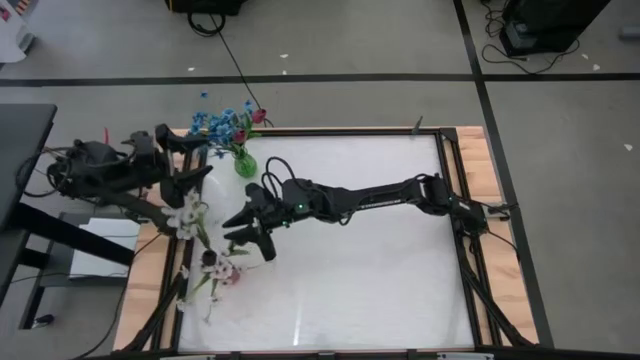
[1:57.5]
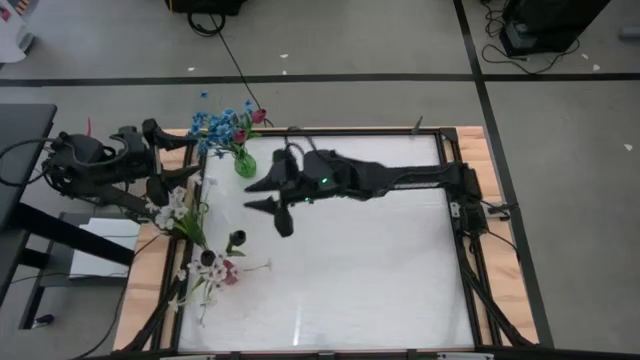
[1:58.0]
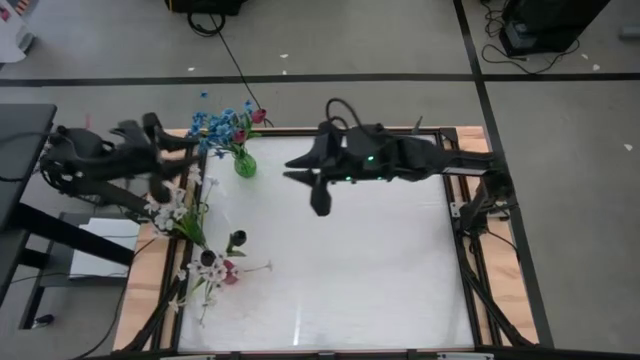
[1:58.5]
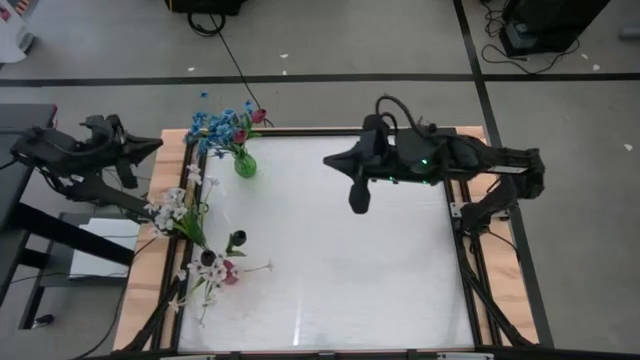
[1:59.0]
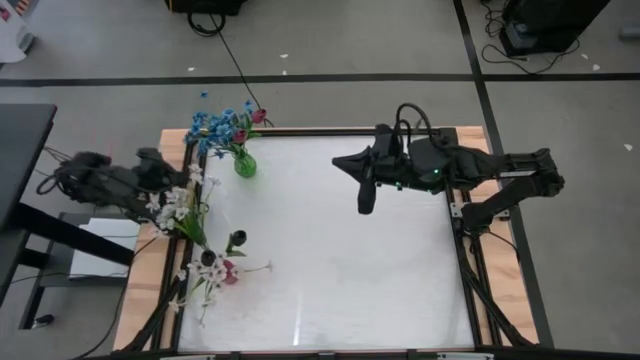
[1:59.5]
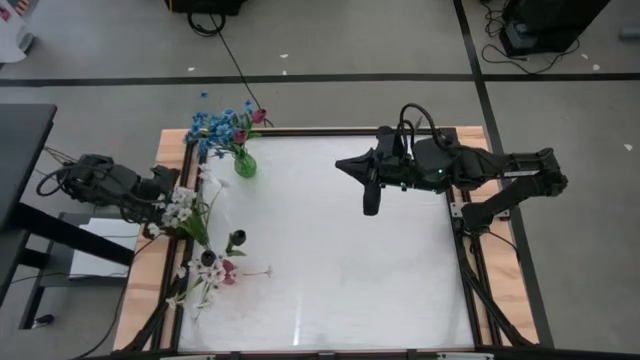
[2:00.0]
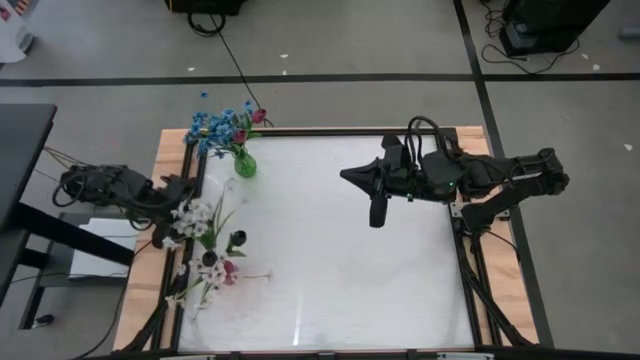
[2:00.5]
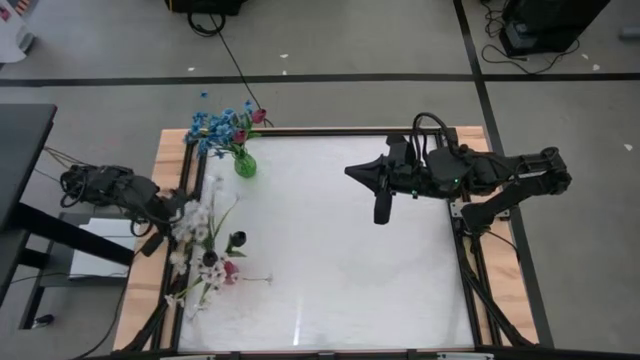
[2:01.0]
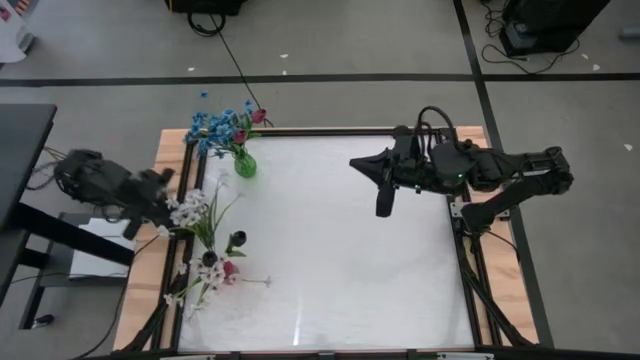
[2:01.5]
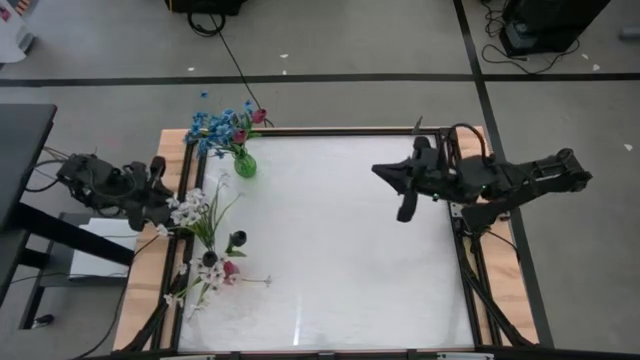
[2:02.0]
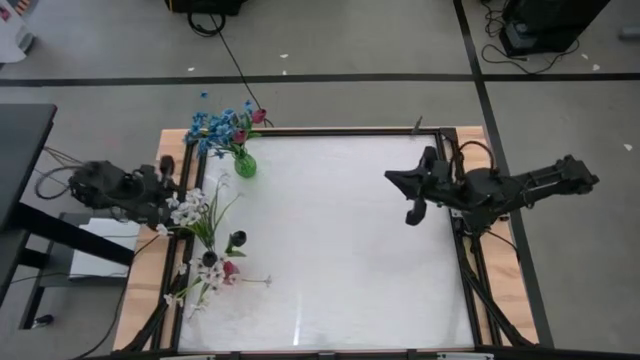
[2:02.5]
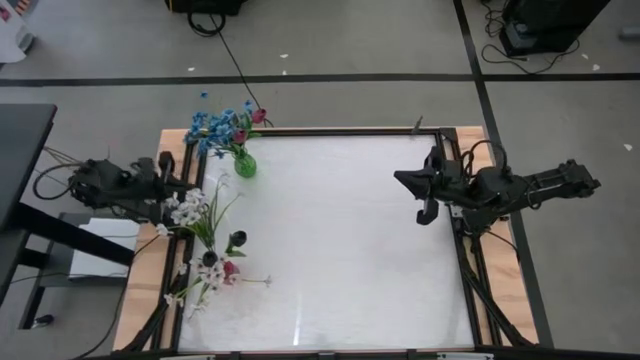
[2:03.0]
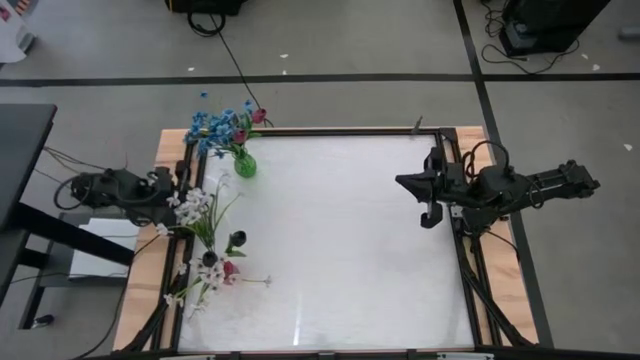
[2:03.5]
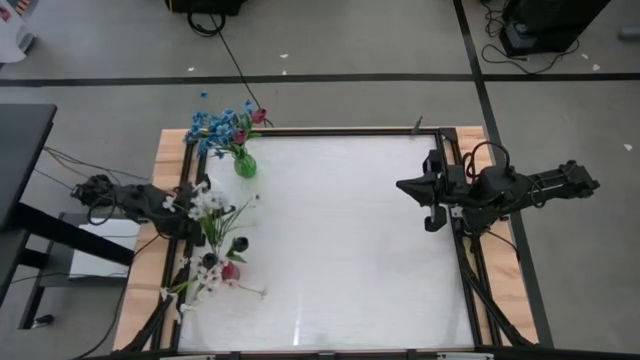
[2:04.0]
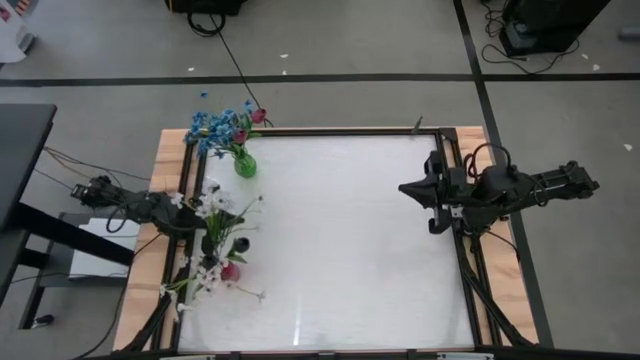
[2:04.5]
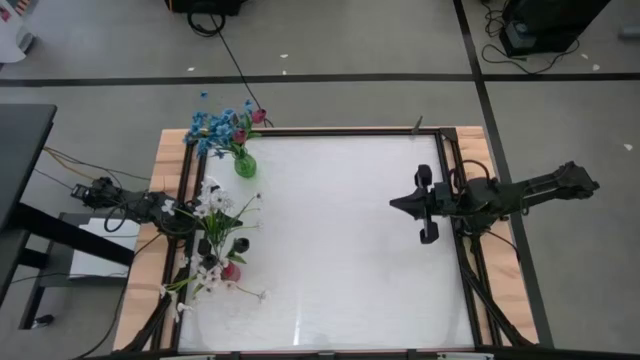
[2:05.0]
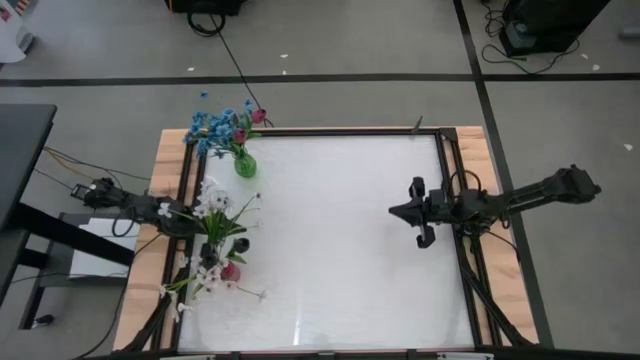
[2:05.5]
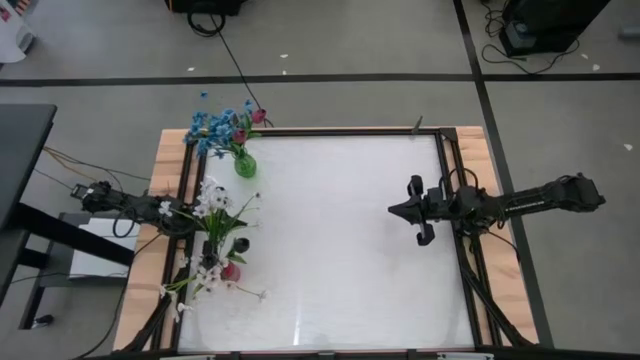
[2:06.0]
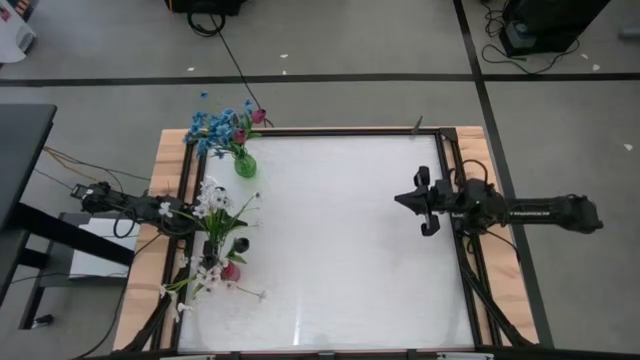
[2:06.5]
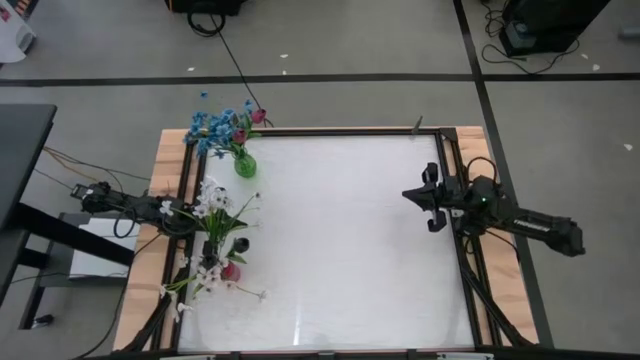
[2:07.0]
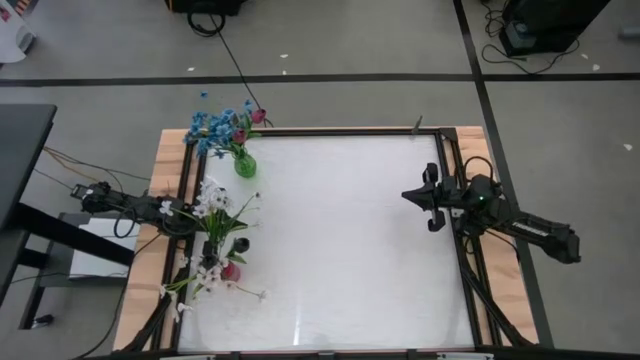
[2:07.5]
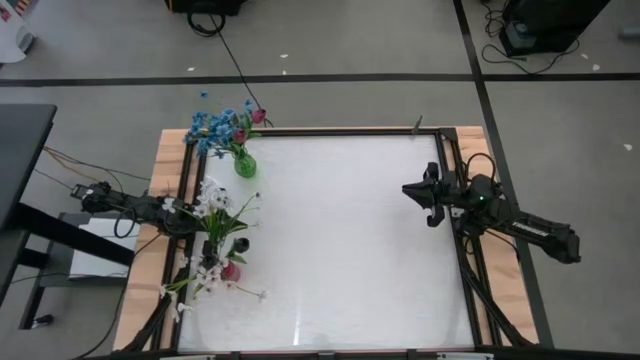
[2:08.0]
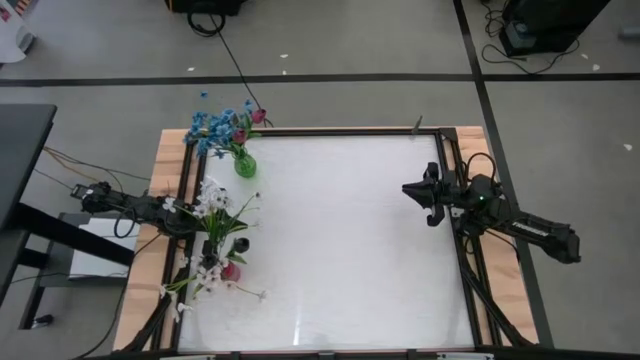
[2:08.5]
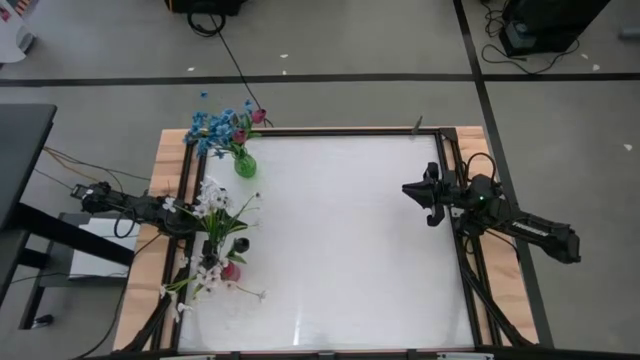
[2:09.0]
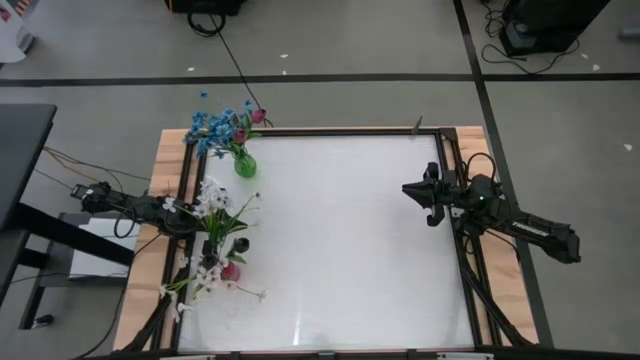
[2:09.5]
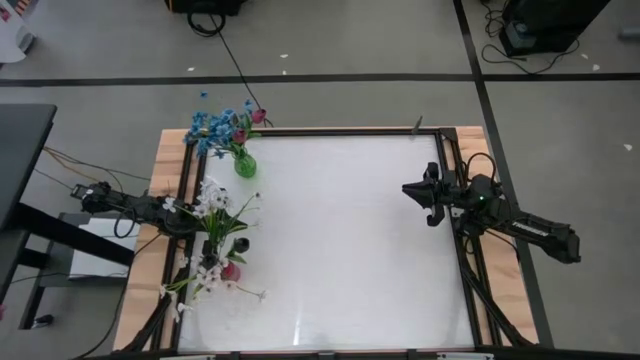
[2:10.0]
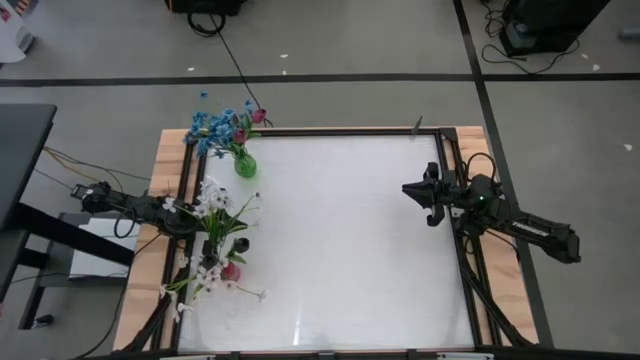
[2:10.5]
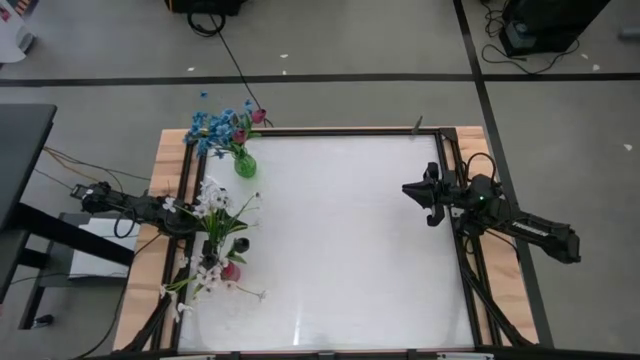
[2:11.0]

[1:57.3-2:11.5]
Task: Sort flowers into vase by color
Return to Home Position

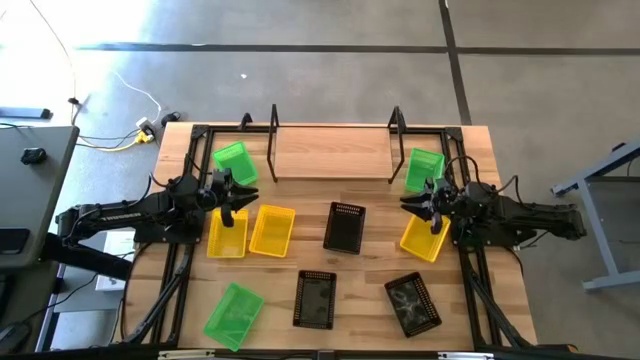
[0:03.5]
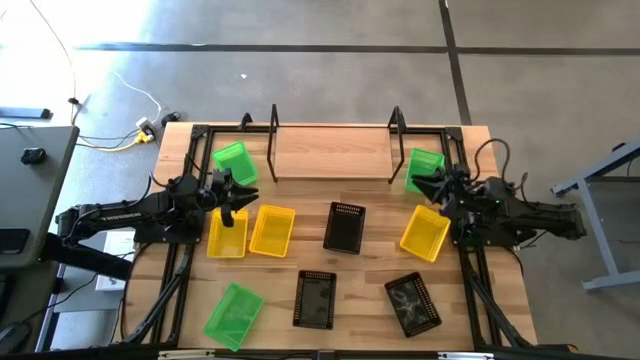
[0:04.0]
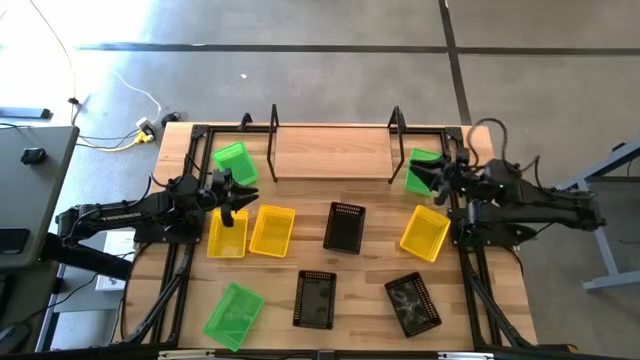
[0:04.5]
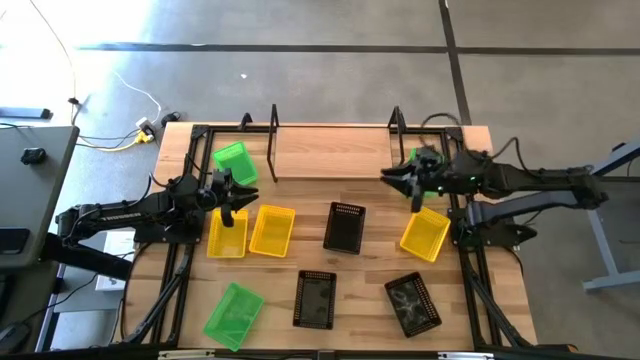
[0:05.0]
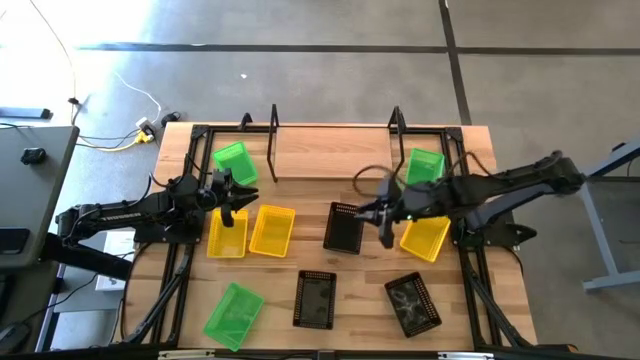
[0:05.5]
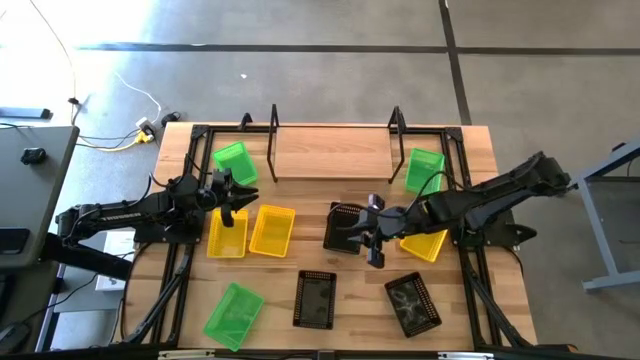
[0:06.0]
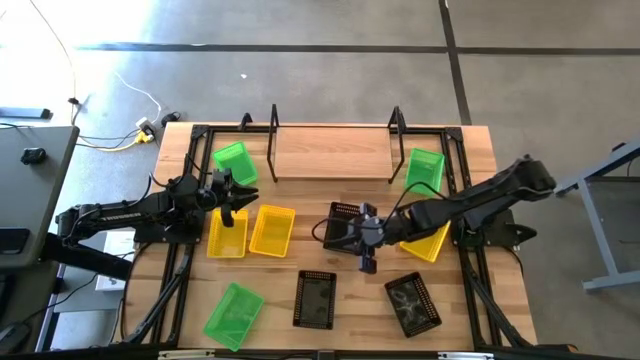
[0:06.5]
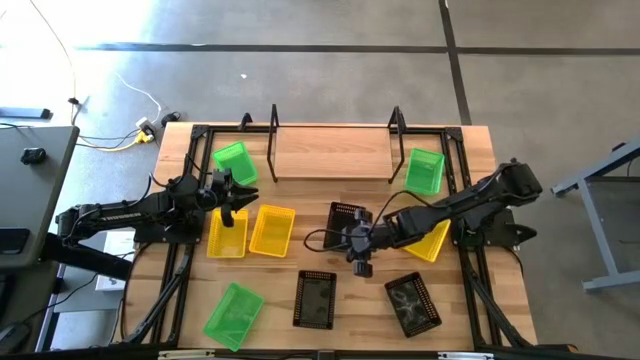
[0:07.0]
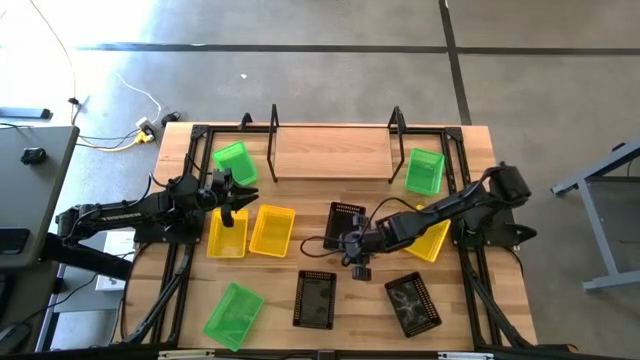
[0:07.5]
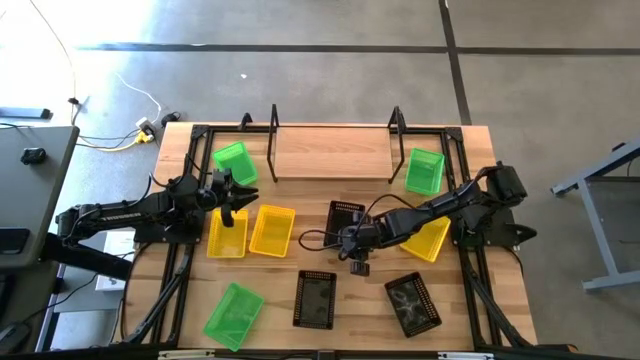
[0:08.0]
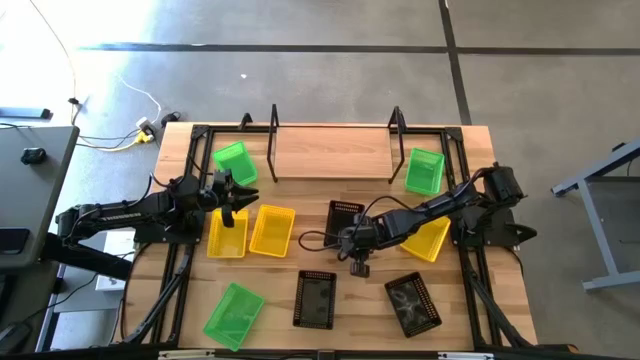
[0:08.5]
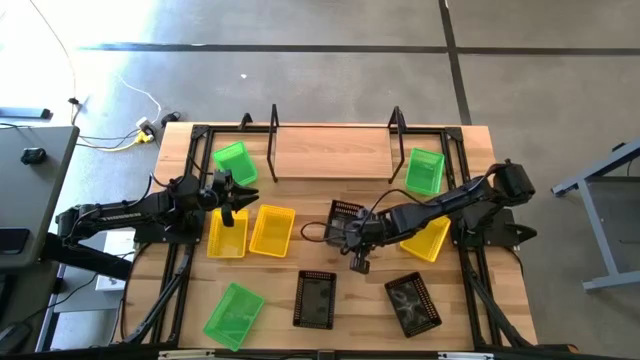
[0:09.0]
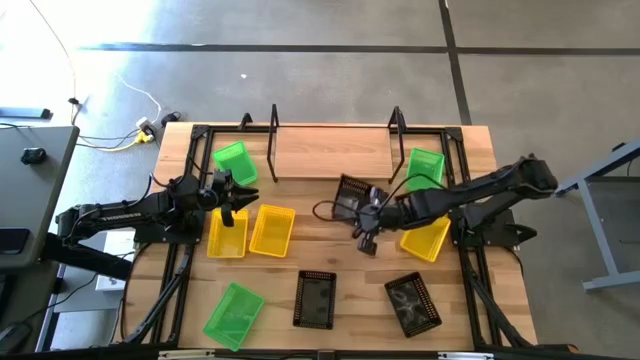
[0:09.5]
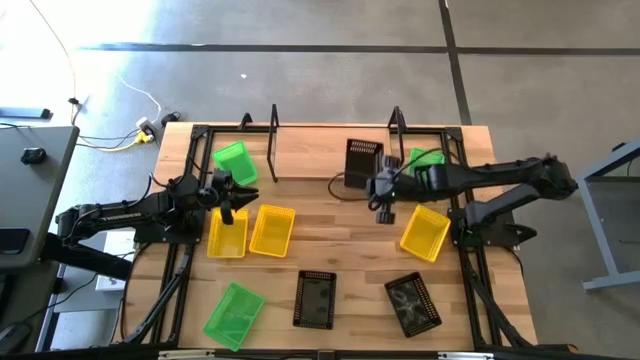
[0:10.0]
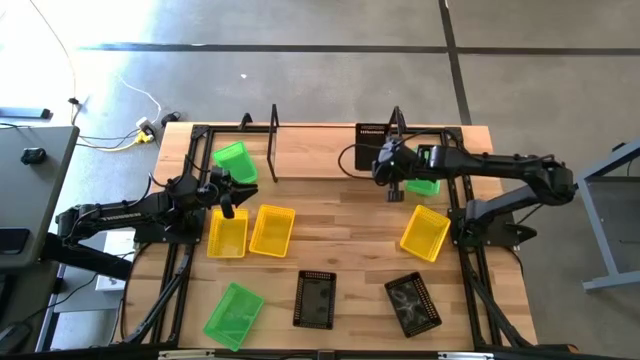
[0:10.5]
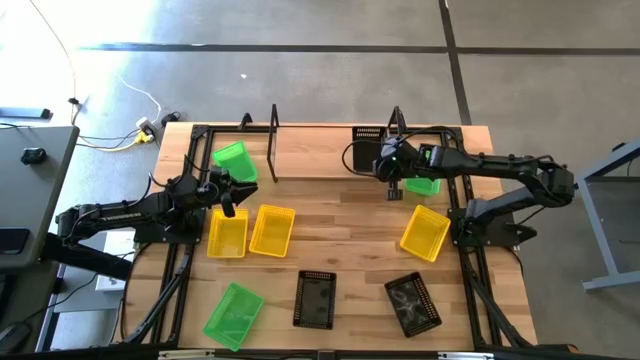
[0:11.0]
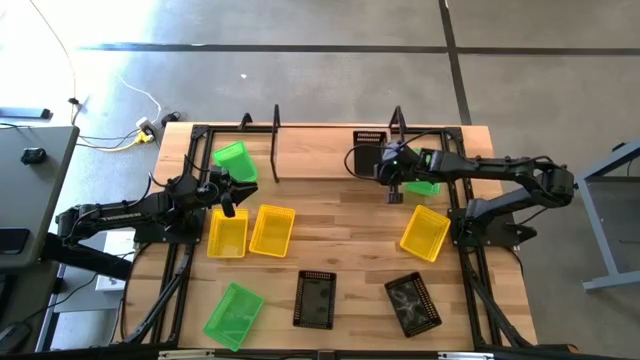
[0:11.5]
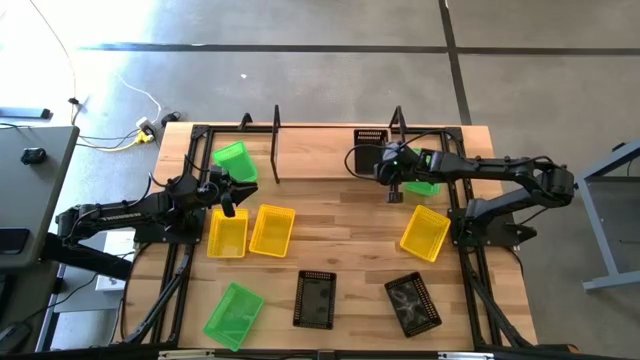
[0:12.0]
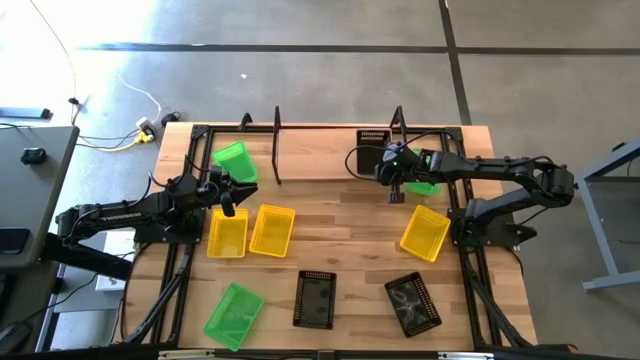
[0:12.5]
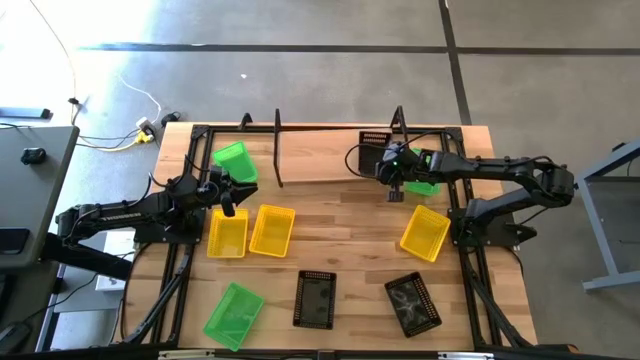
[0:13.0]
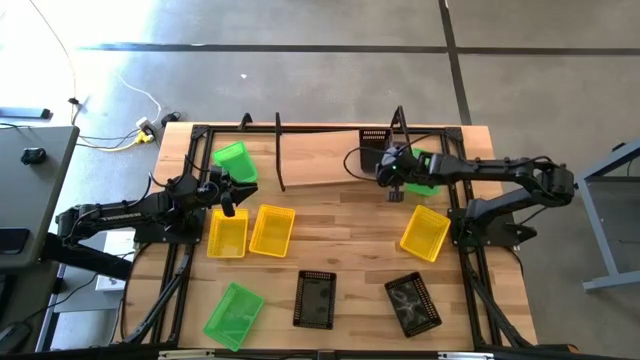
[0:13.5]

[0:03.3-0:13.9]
Task: Stack baskets on shelf by color
Put the top black bin on the shelf
